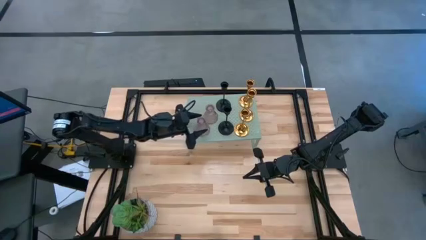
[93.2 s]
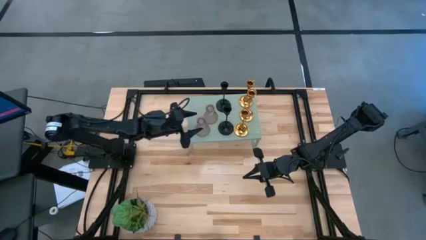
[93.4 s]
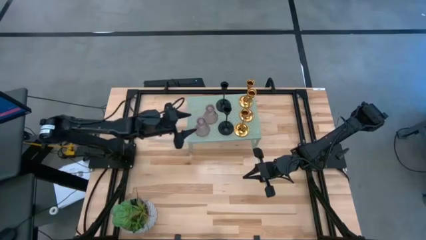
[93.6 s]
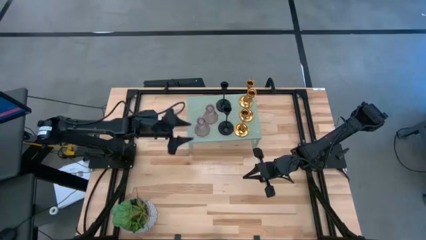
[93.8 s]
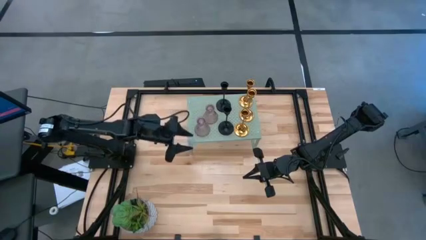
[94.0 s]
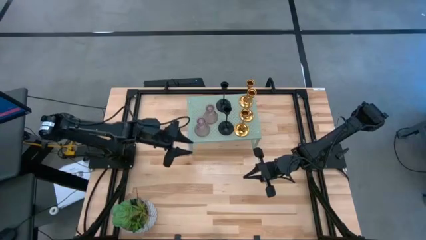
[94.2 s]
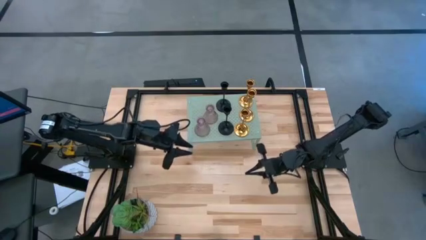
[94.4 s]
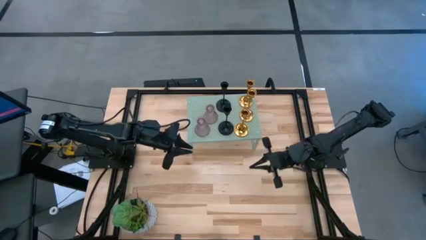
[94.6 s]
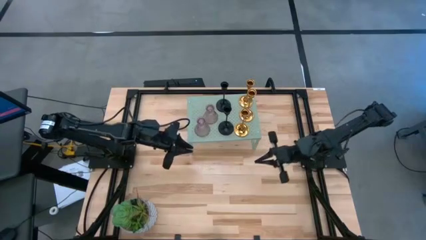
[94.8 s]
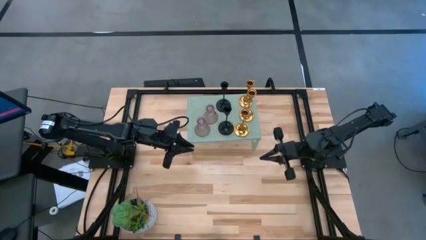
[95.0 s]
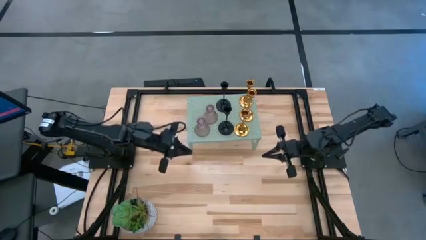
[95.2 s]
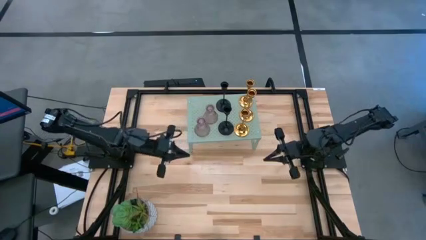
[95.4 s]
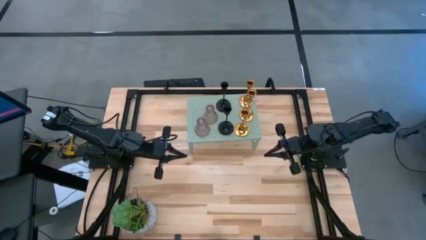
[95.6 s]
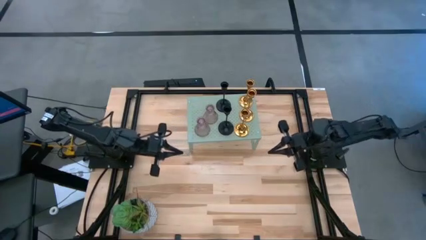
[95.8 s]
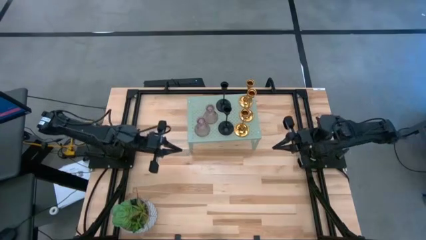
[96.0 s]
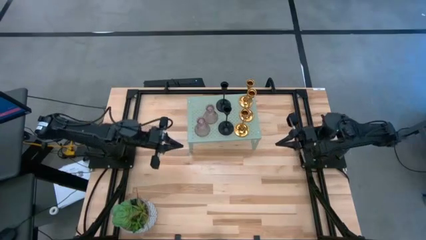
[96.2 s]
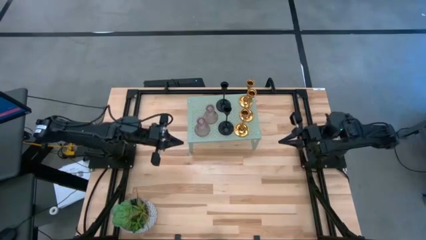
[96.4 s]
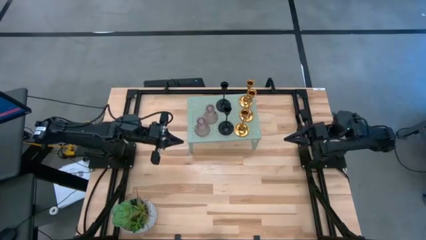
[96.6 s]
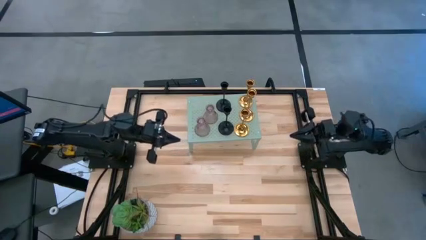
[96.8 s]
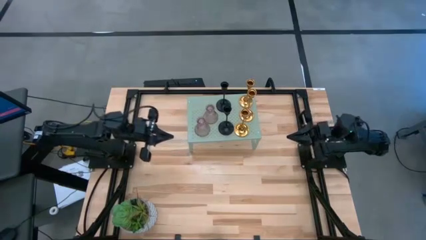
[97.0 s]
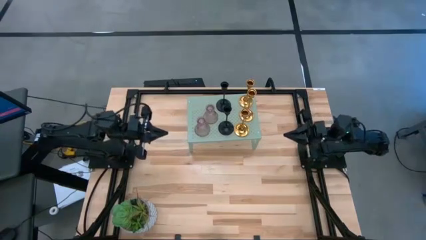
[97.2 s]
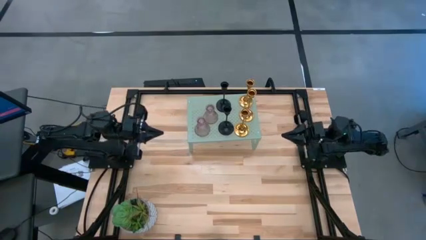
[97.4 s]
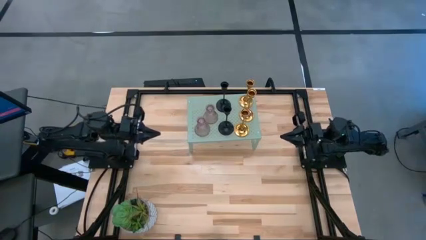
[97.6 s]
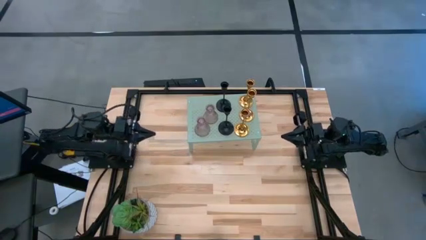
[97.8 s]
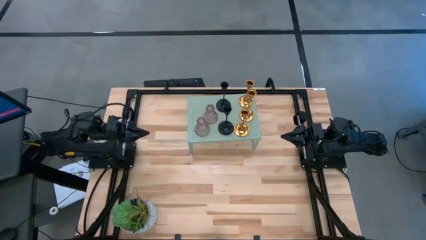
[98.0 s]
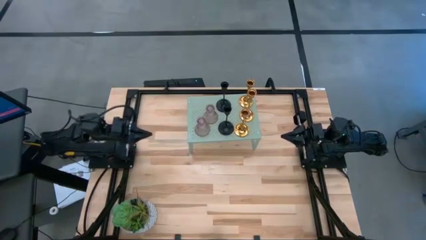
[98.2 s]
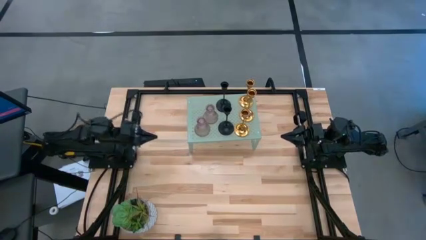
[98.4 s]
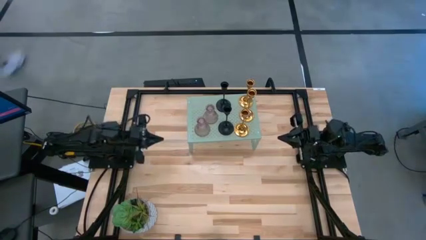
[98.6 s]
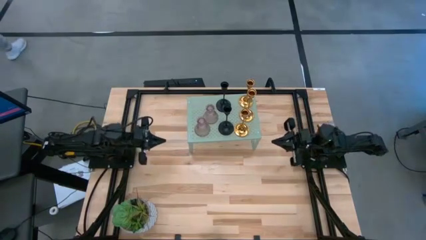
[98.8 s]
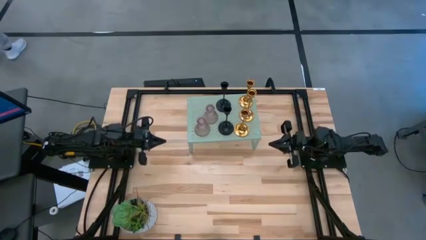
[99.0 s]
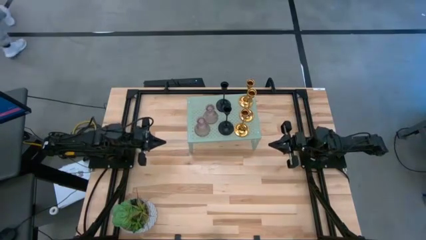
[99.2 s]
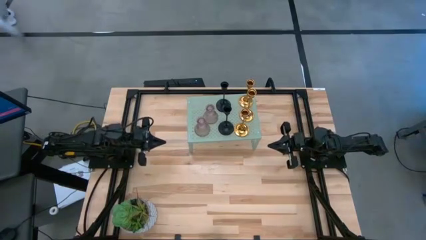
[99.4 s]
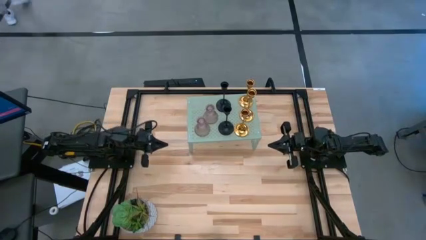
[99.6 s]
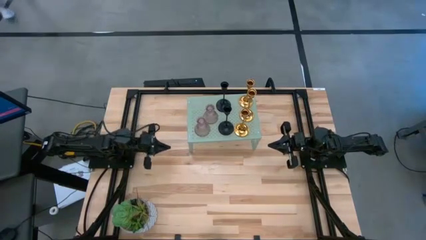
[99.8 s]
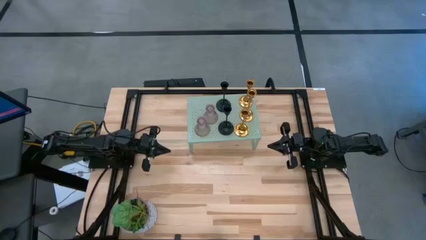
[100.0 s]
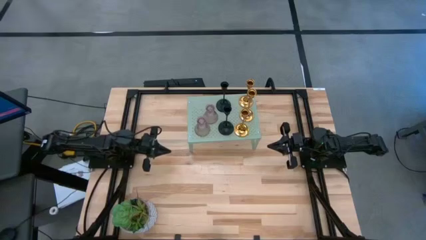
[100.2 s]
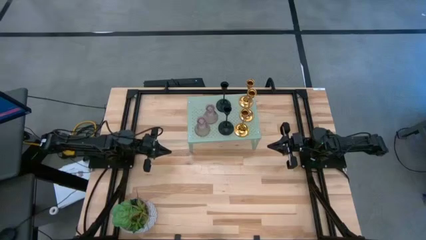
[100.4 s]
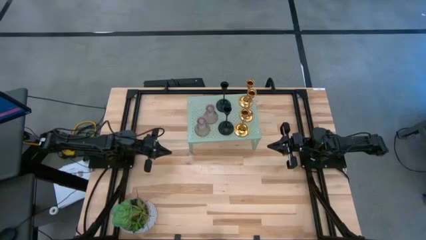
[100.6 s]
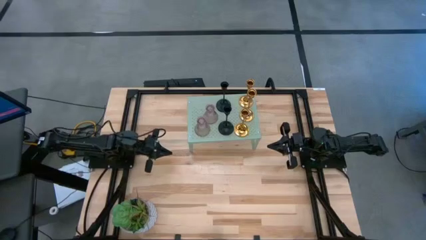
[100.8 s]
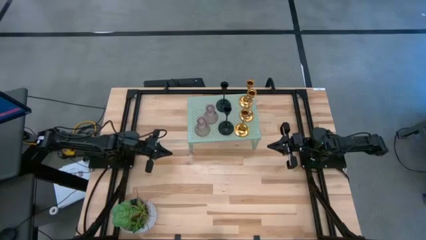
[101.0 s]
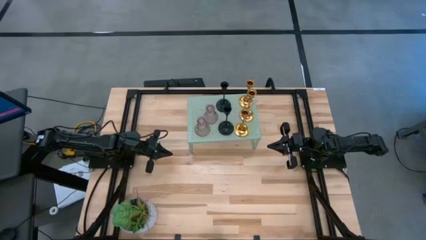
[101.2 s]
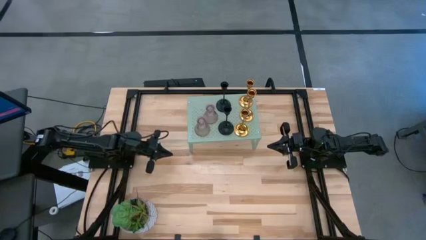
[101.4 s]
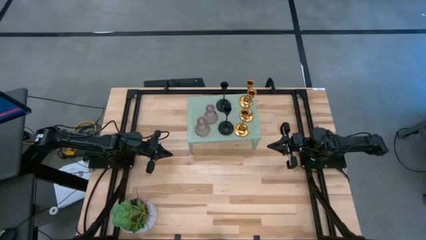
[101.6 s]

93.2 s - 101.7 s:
Task: Pick & Place candle stick holders
Return to Home Position

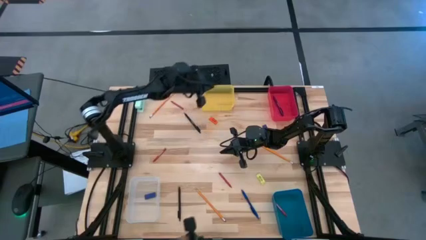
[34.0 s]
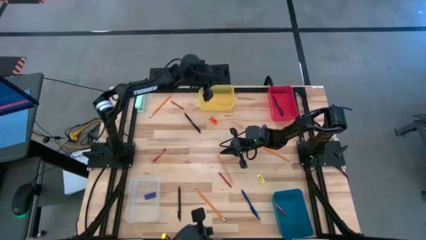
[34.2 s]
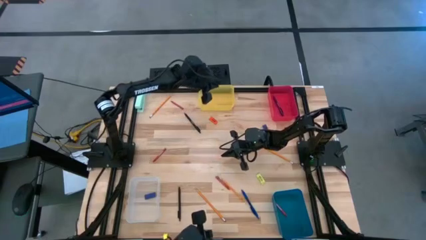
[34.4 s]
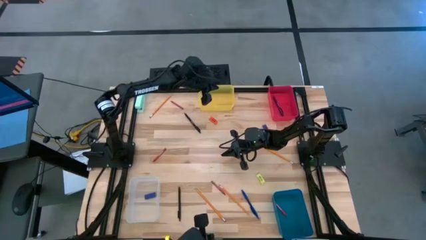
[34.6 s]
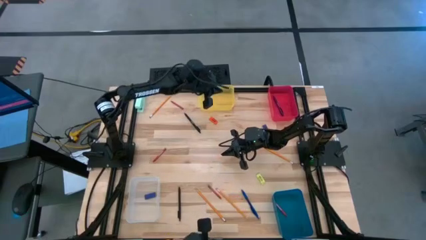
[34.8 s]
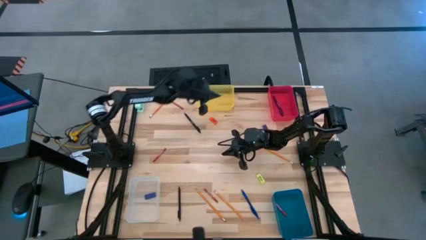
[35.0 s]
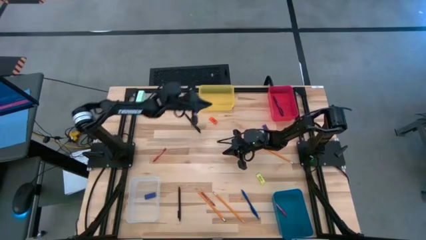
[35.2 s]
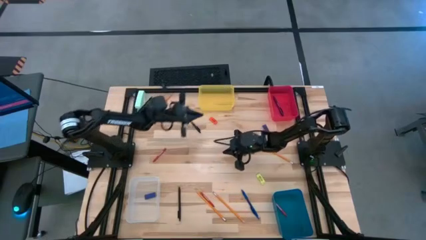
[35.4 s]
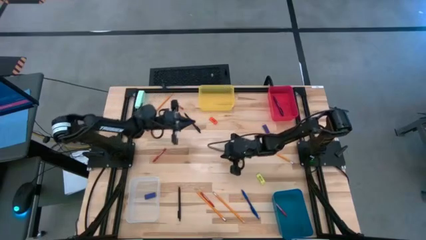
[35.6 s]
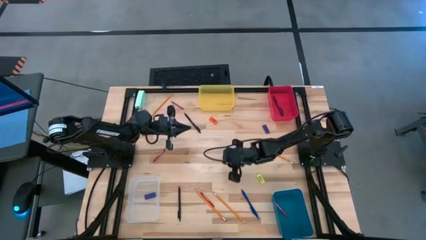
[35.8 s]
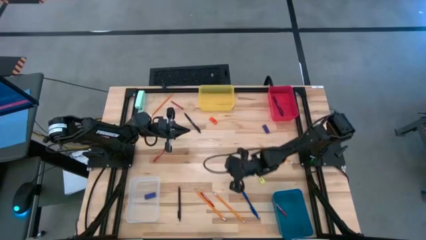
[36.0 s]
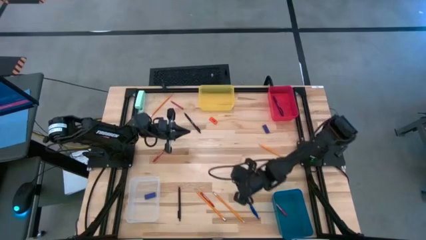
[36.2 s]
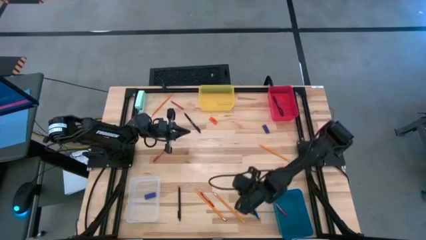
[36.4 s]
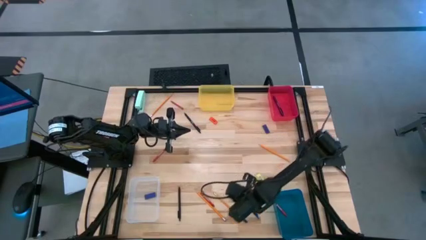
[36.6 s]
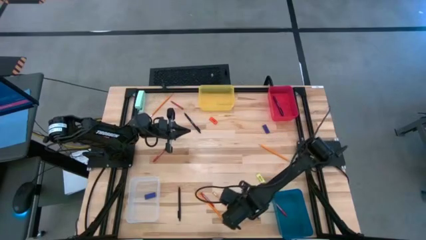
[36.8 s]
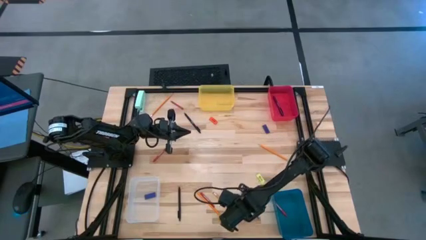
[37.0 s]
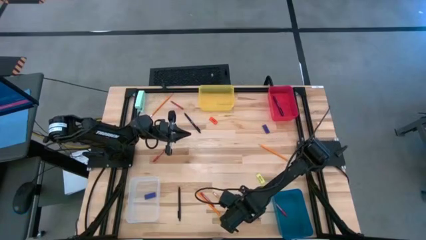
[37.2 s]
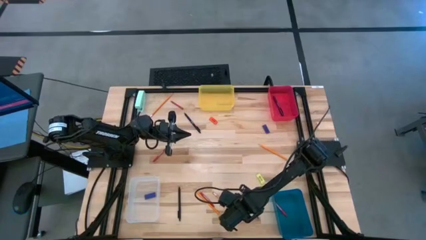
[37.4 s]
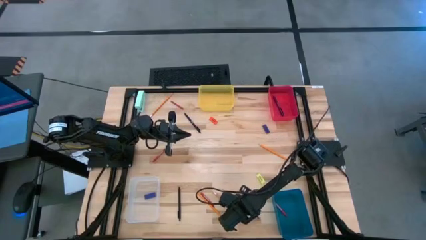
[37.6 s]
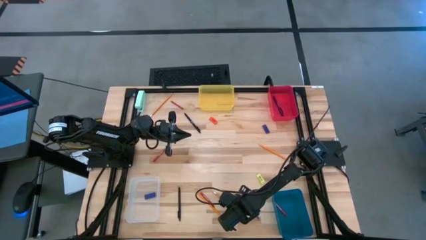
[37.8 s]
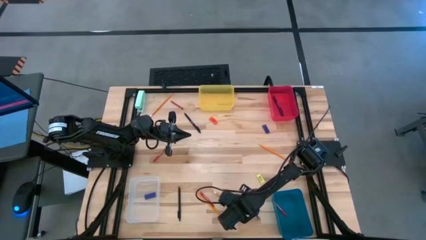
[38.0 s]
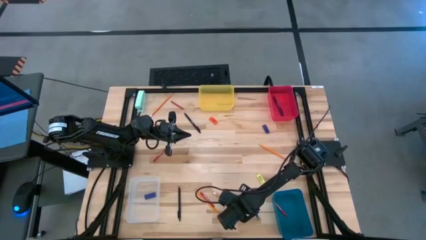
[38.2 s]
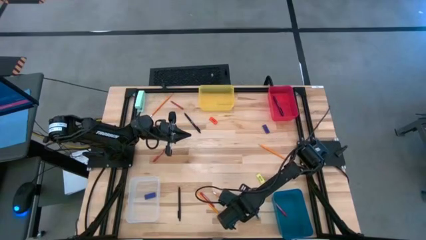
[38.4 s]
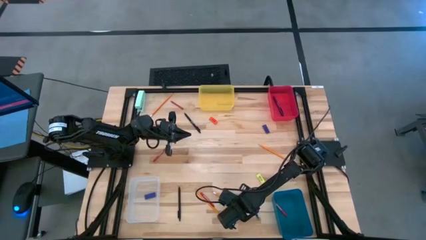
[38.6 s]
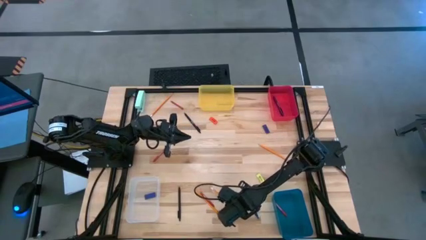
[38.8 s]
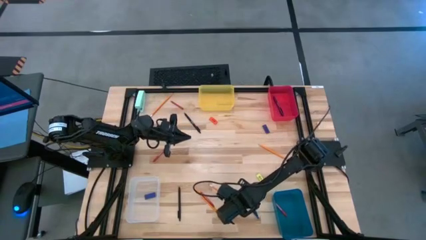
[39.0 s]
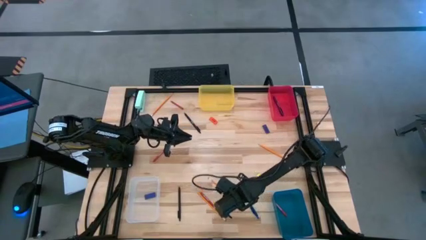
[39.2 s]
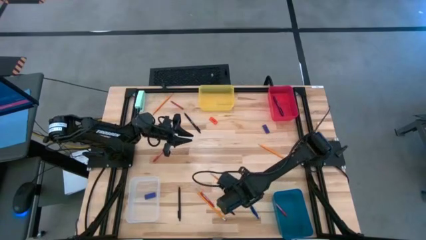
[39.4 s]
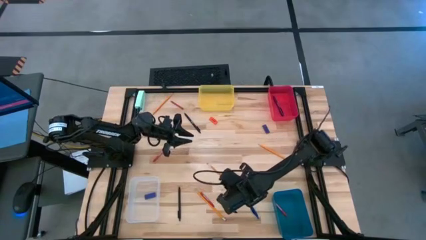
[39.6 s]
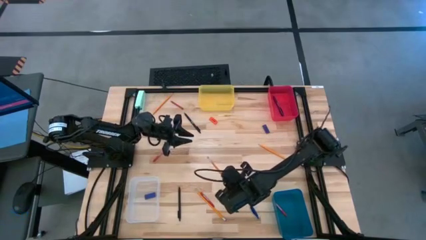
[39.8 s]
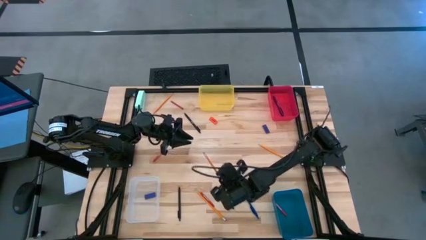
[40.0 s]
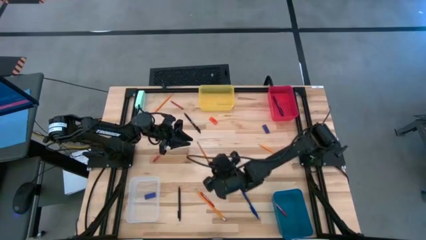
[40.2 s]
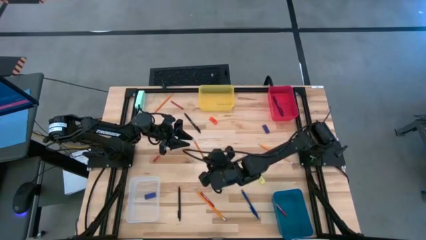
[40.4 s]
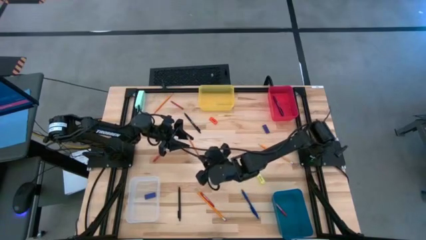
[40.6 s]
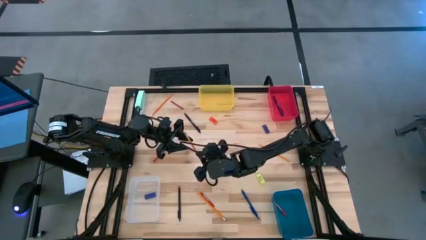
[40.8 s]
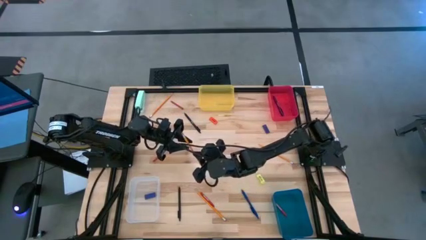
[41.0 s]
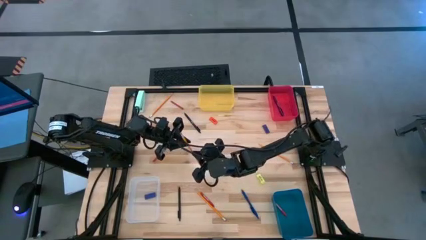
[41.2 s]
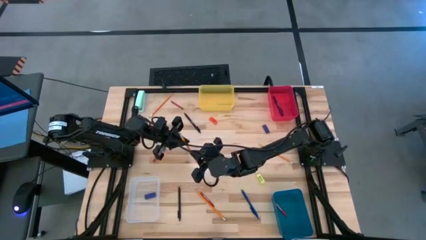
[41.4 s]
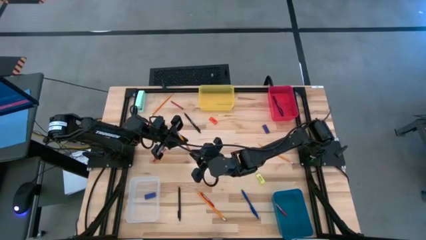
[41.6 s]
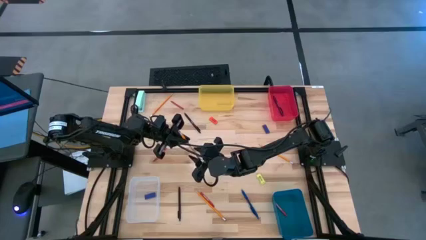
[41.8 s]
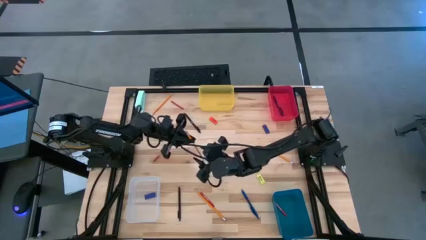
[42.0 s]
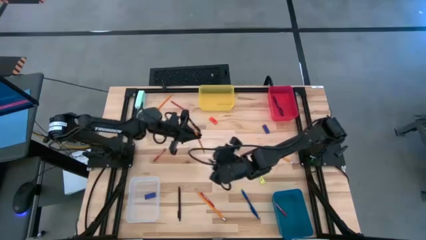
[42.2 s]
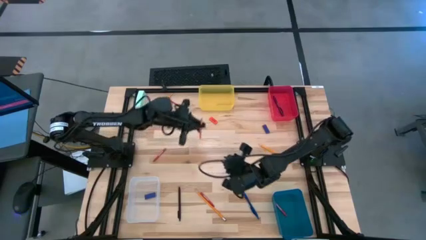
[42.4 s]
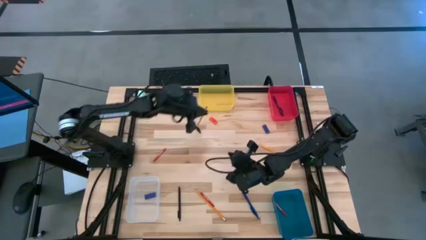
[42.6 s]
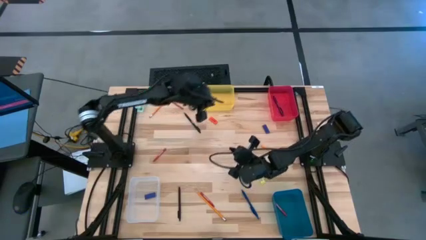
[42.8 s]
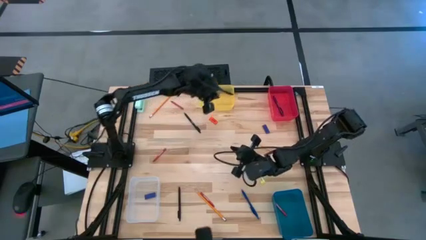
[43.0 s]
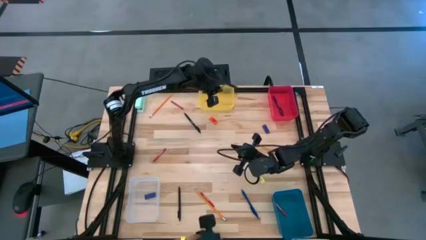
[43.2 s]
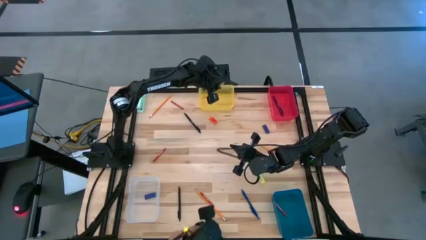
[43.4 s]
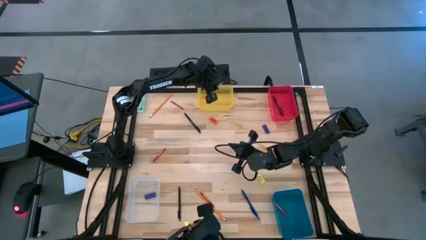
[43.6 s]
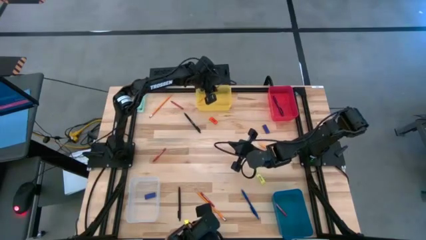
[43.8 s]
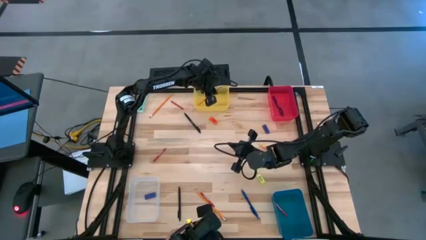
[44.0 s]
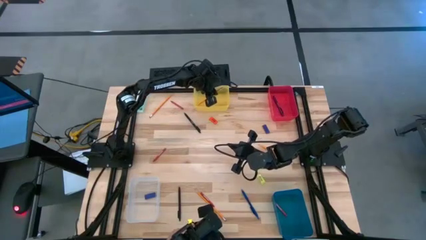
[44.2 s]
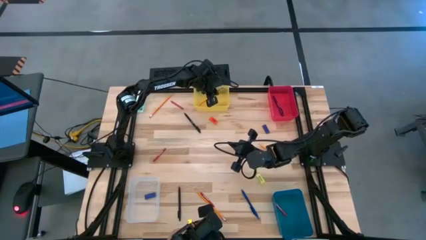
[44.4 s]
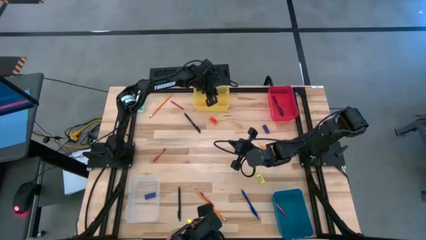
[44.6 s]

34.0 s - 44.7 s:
Task: Sort crayons/erasers/pens/pencils in bins
Put the orange pencil into the yellow bin
